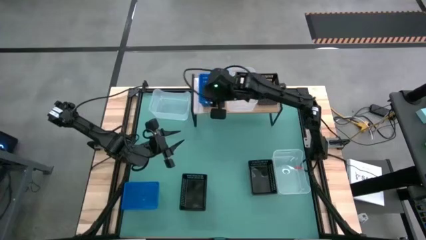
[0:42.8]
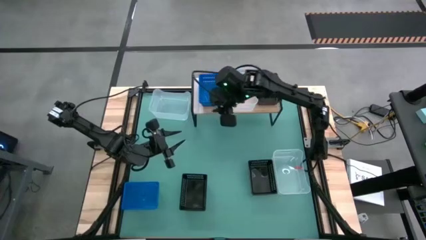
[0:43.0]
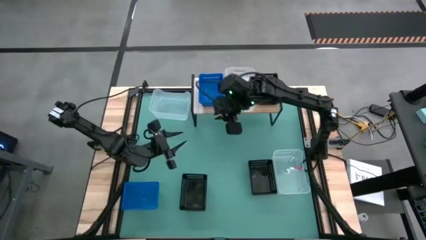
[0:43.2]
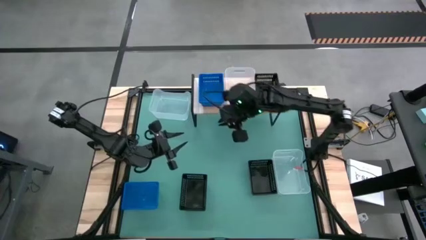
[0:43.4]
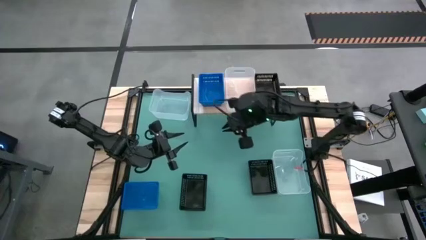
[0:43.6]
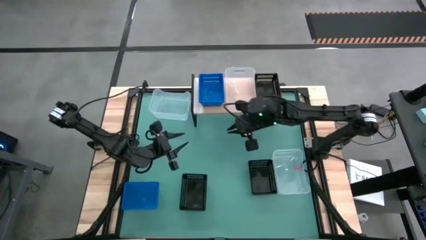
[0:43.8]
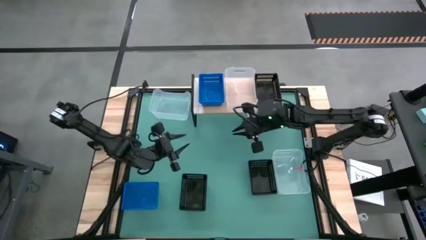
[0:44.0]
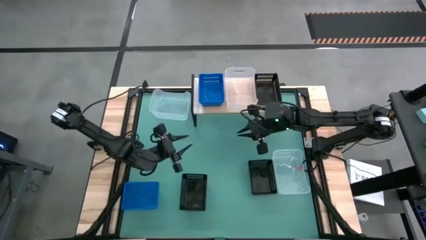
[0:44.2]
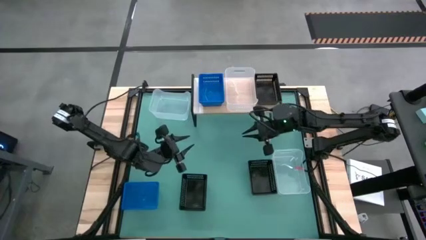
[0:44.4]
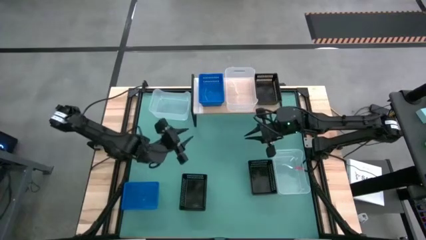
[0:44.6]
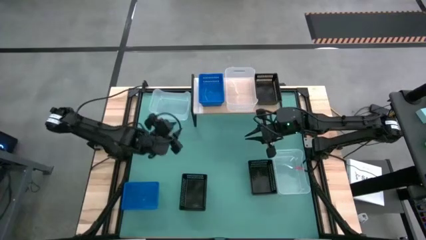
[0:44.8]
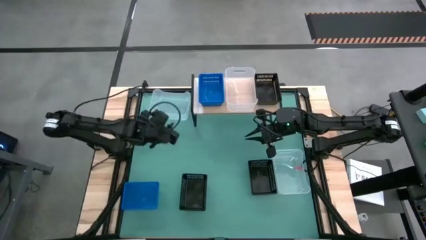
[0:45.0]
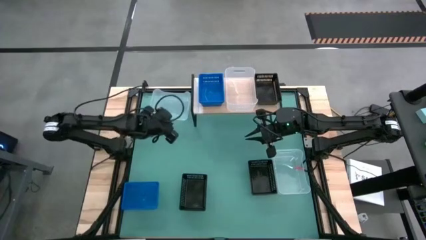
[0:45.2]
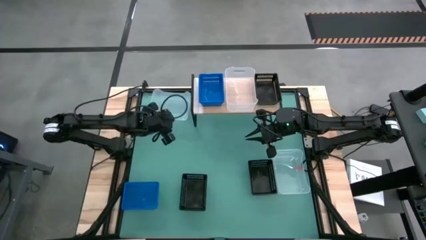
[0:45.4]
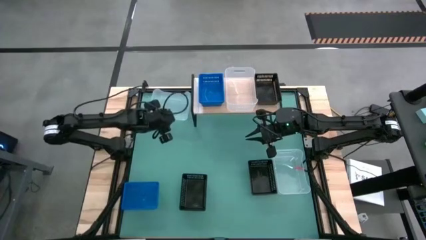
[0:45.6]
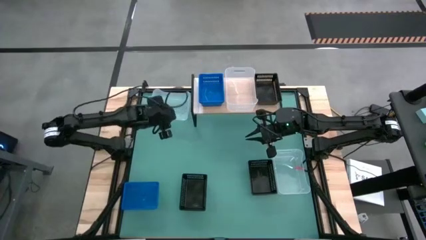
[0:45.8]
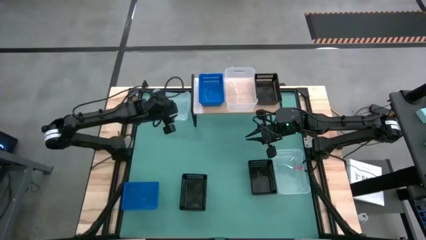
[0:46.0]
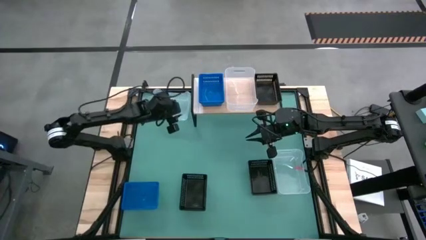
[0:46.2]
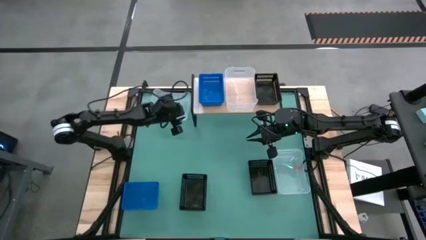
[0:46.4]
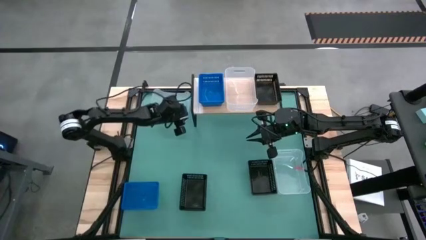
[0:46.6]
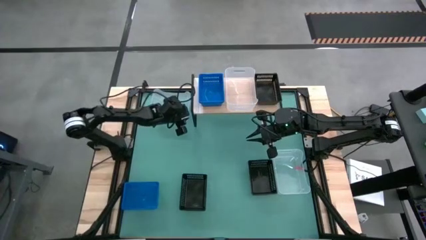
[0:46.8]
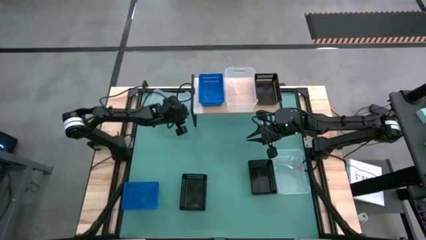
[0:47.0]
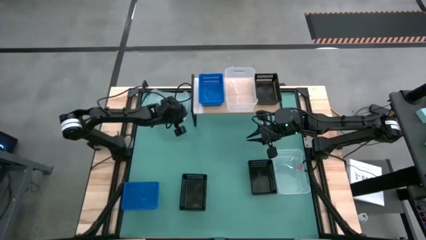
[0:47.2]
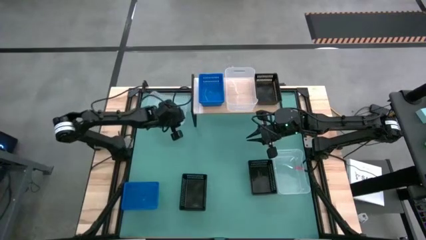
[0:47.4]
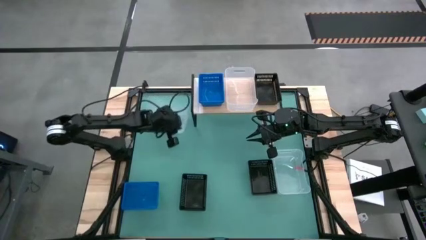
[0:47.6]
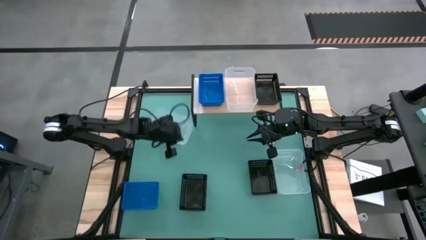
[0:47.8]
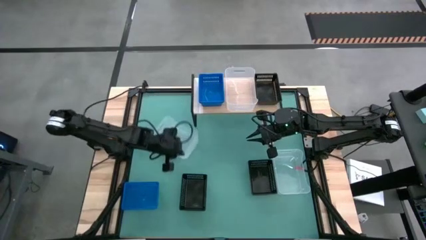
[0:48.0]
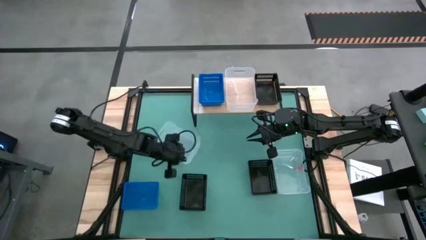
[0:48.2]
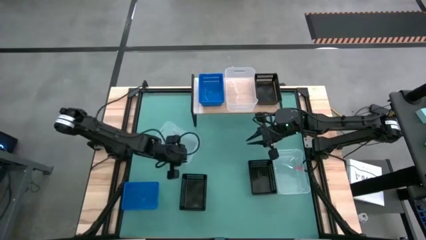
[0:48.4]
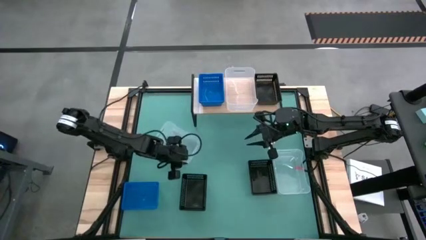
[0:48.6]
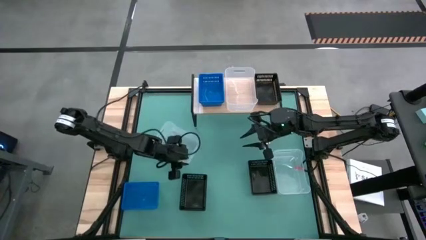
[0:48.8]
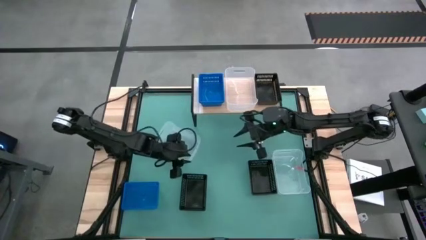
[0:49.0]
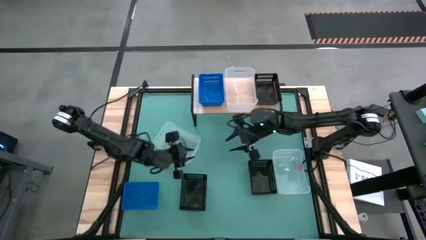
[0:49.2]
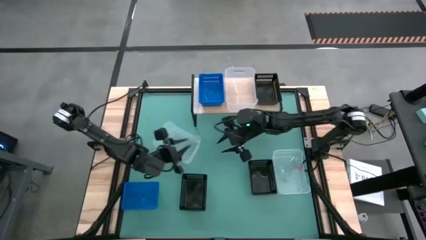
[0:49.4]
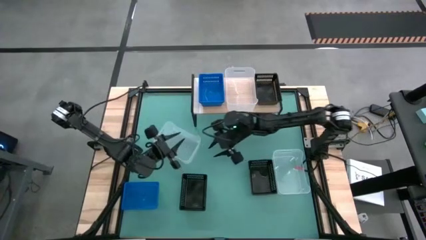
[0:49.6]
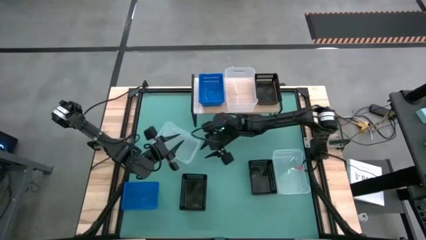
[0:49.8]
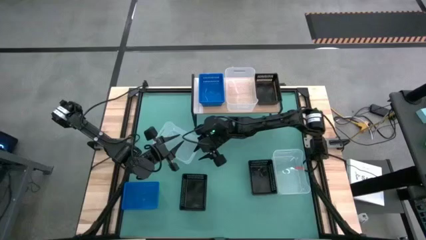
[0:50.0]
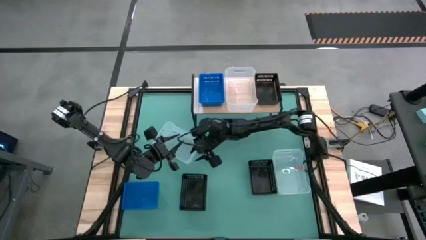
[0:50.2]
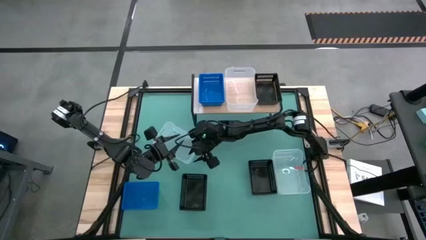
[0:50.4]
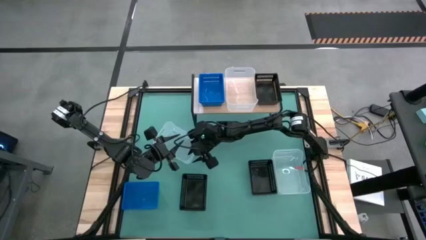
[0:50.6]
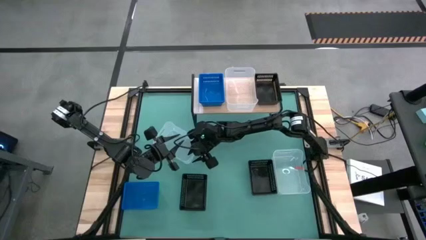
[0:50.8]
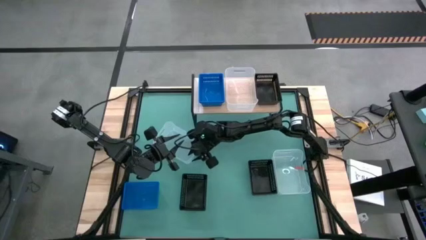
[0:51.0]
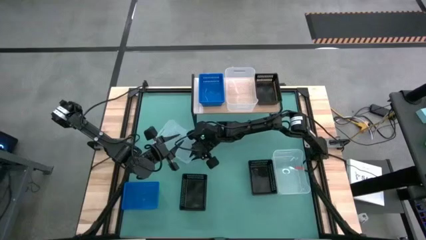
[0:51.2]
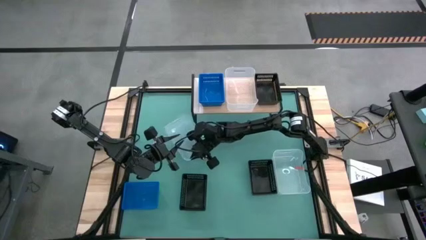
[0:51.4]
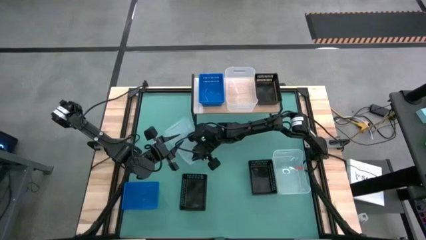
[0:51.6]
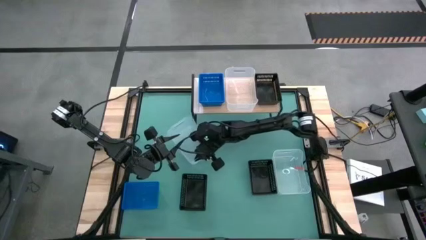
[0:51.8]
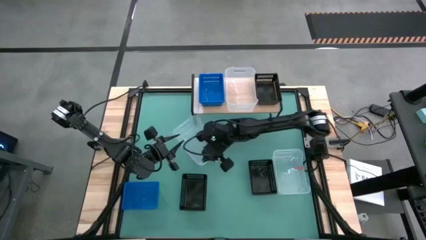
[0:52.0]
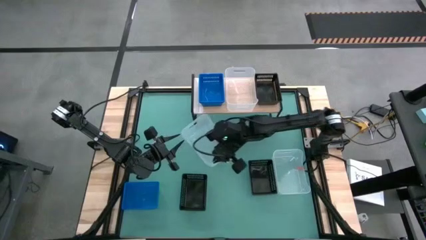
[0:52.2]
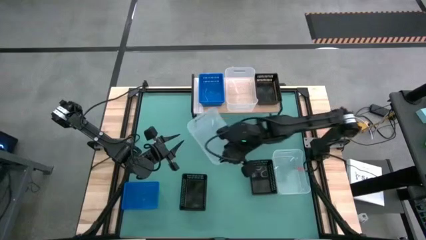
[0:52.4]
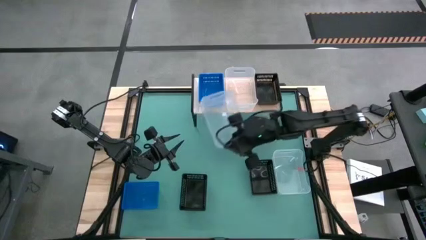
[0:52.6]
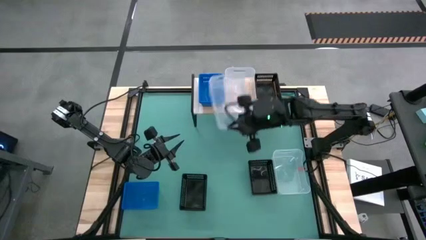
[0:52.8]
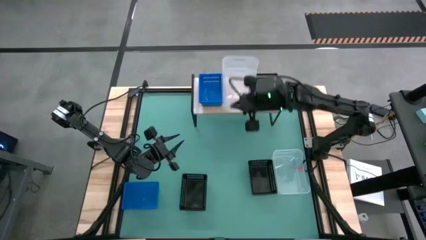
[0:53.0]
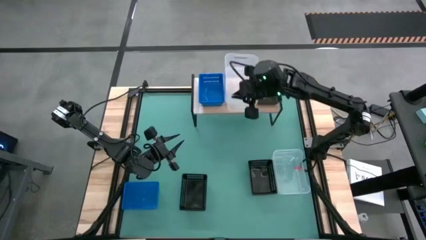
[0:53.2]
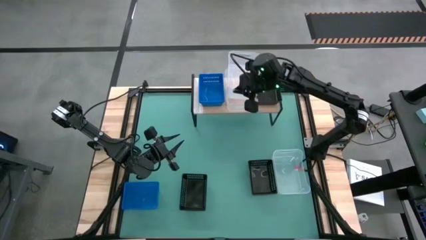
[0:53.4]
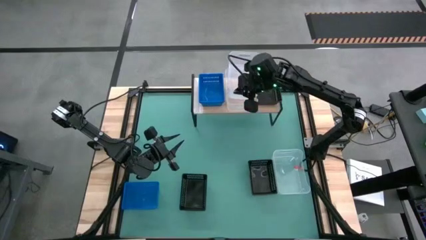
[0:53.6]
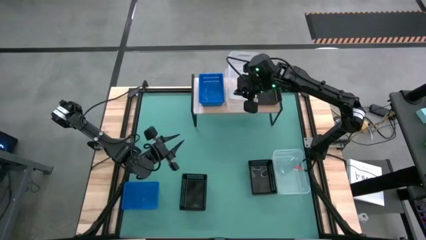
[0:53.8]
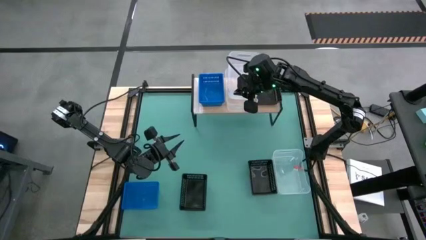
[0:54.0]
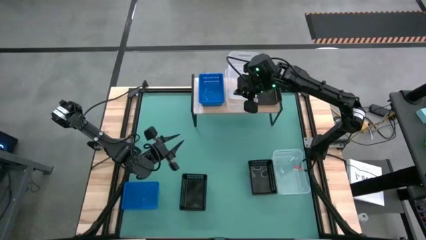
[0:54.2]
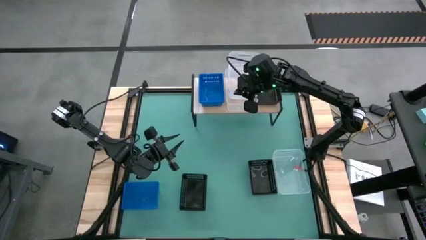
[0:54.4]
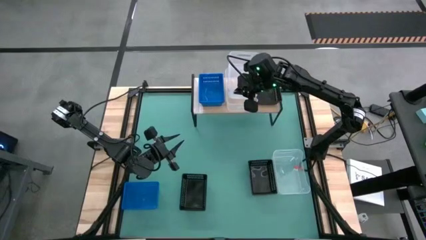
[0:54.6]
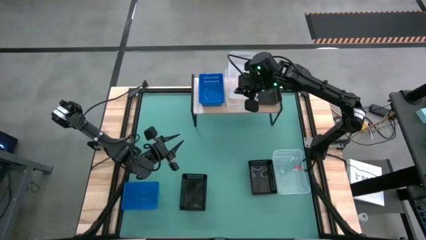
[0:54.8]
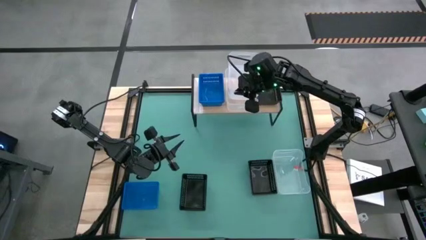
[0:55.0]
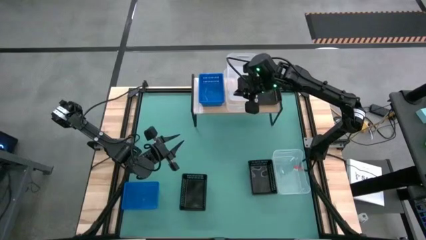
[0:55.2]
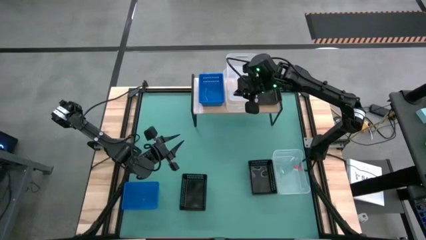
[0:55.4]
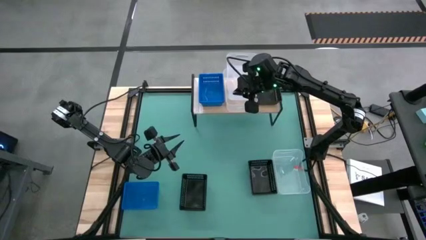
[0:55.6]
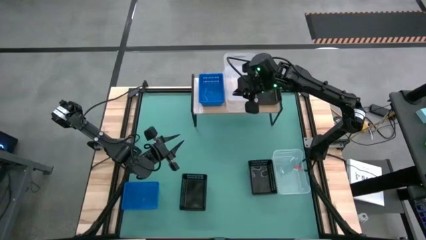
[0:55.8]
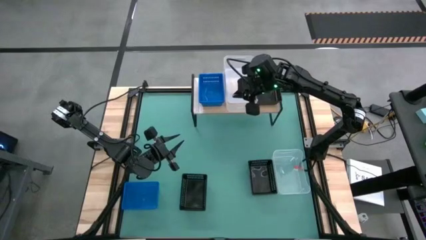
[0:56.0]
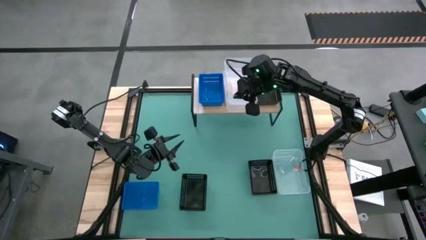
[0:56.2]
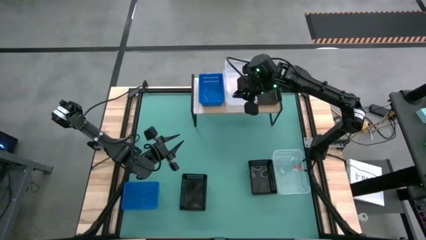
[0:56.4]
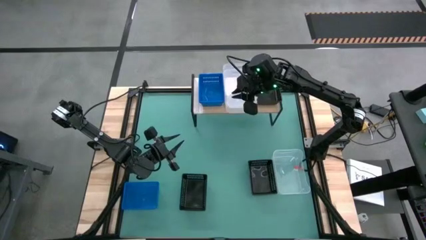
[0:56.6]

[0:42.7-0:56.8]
Task: Stack baskets on shelf by color
Stack the left transparent bin on the transparent bin on the shelf

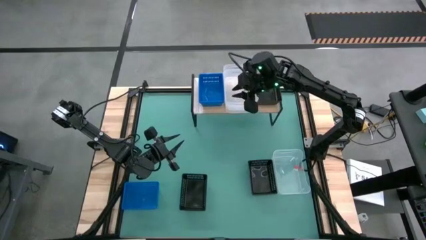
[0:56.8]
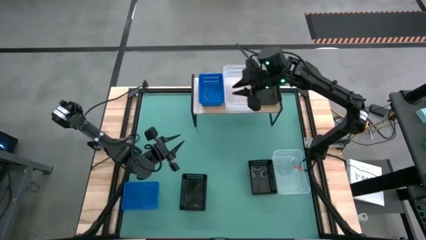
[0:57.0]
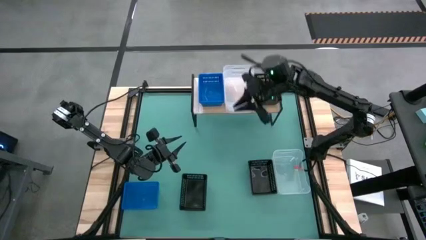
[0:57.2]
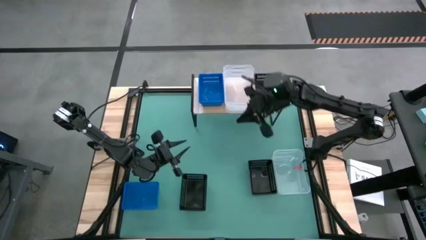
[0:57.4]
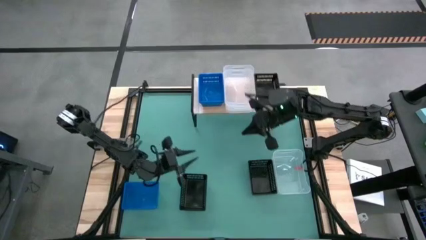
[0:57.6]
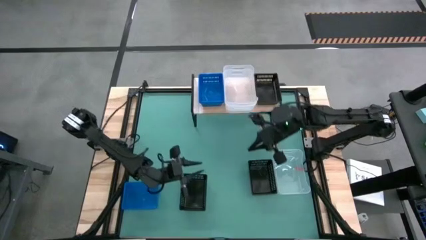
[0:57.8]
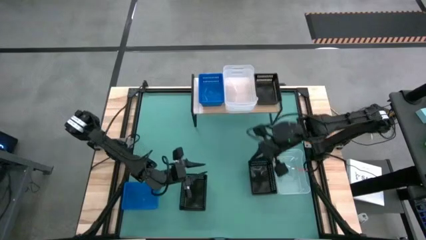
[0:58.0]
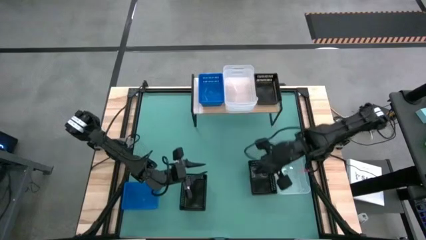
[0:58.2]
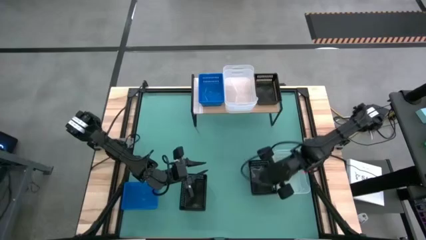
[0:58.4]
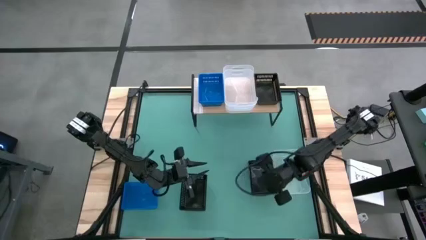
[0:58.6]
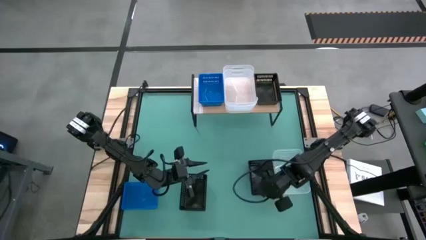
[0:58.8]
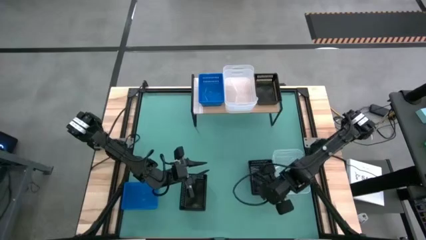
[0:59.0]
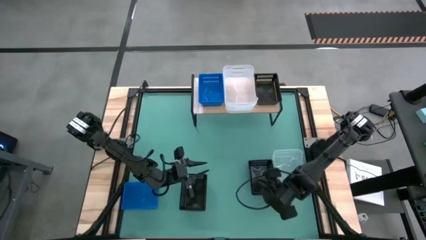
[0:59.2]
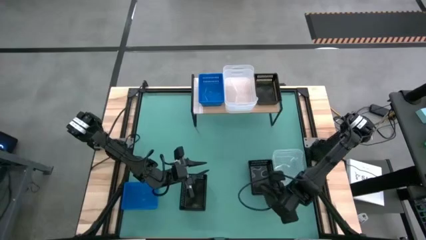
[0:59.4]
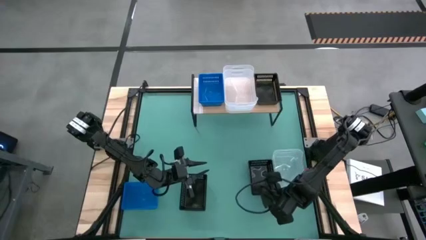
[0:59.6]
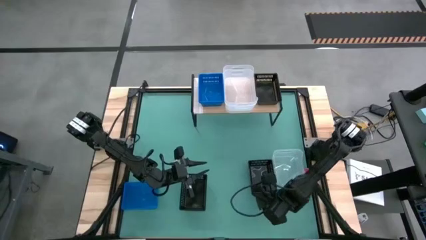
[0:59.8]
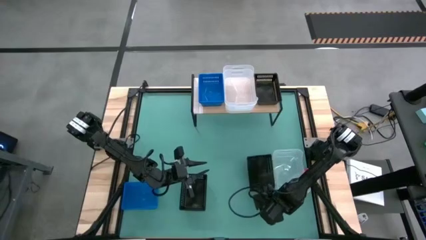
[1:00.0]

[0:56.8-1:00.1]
Stack the right black bin on the black bin on the shelf
